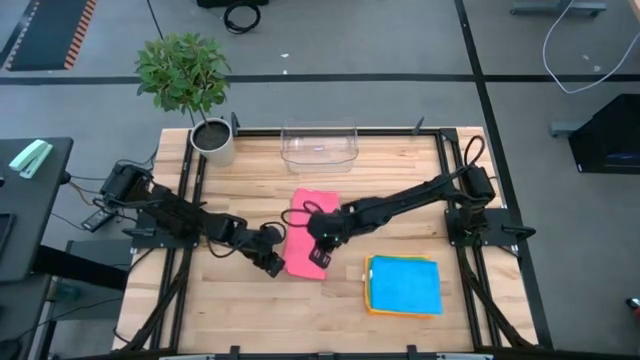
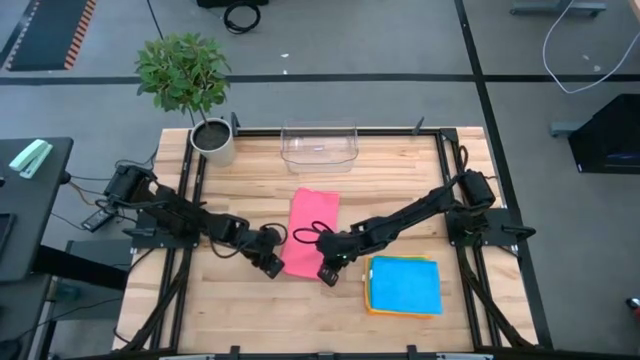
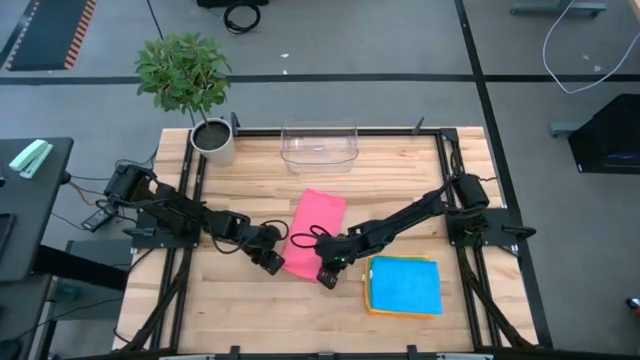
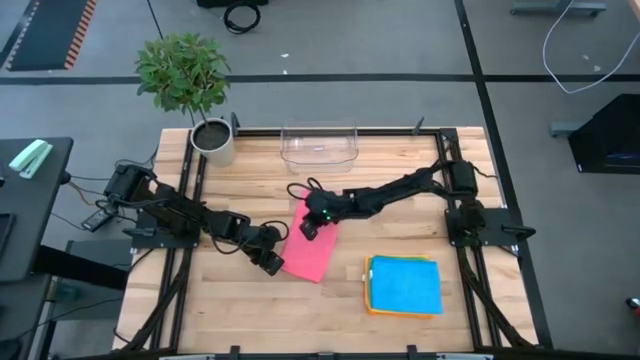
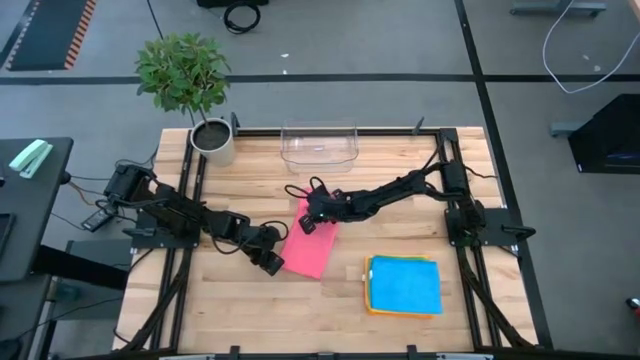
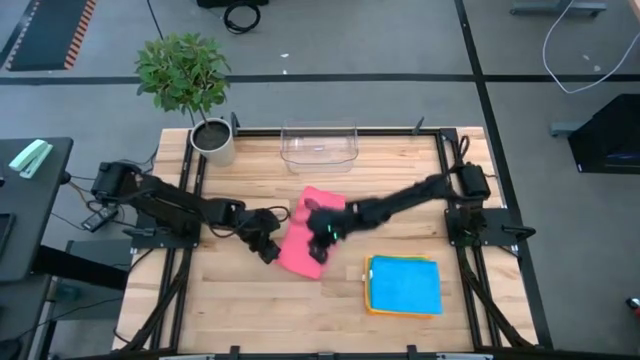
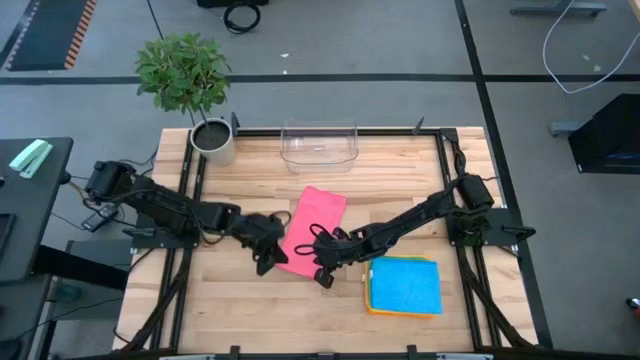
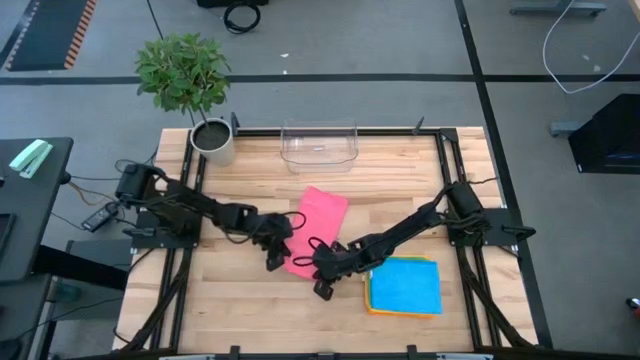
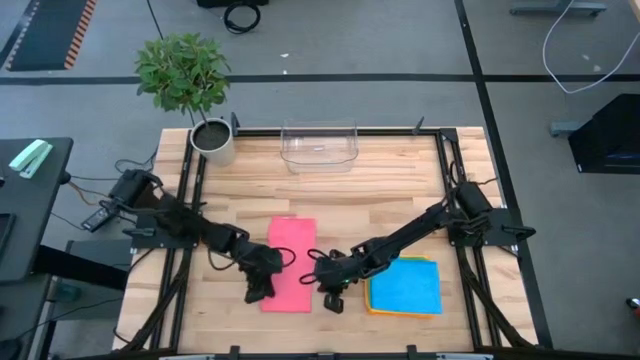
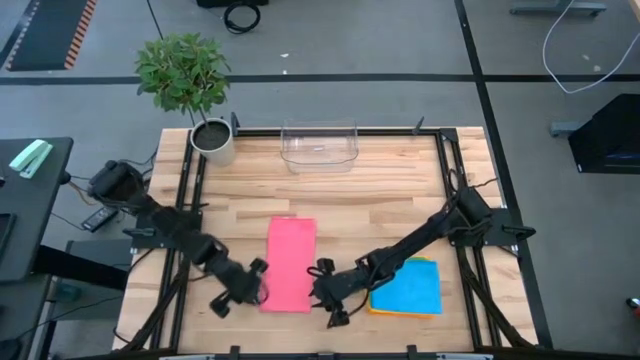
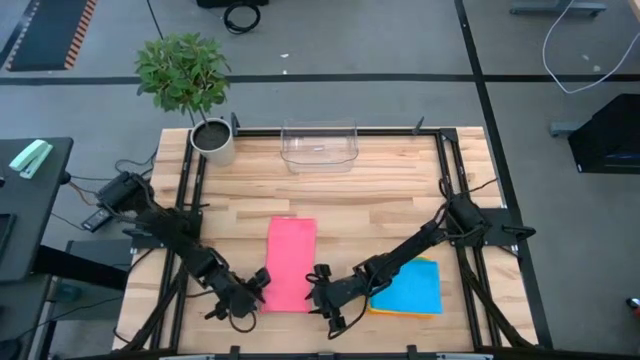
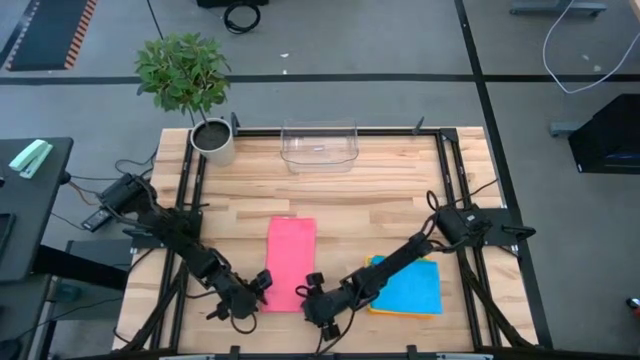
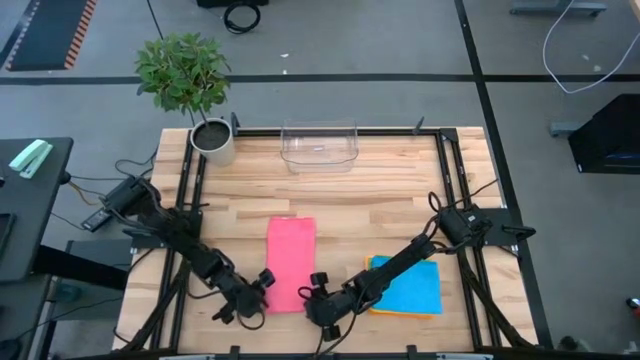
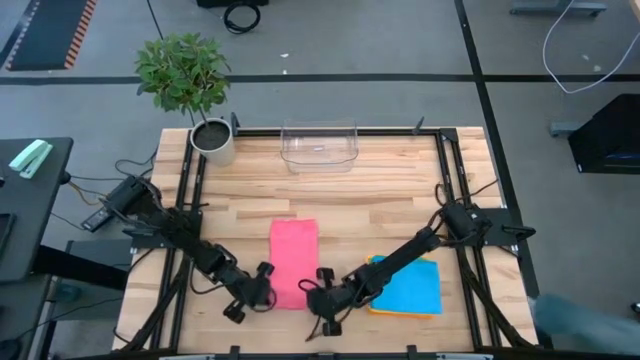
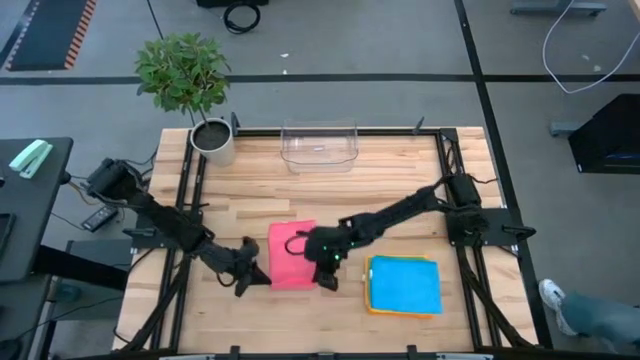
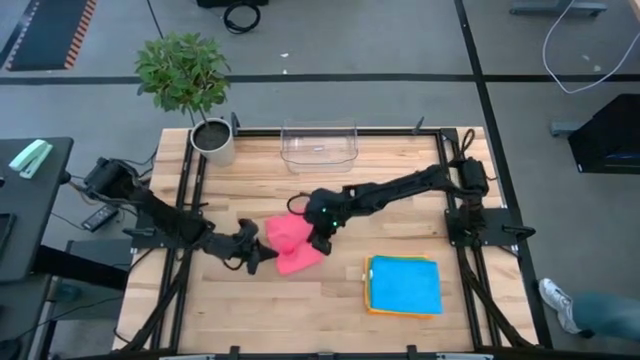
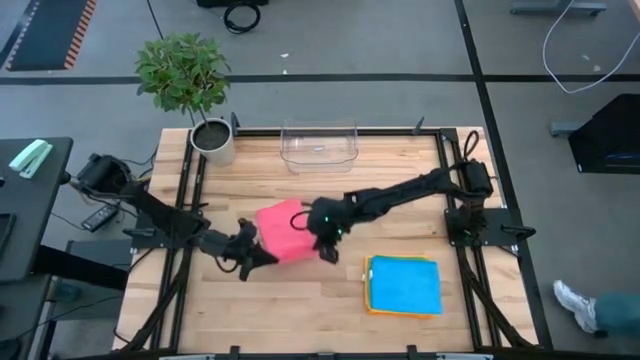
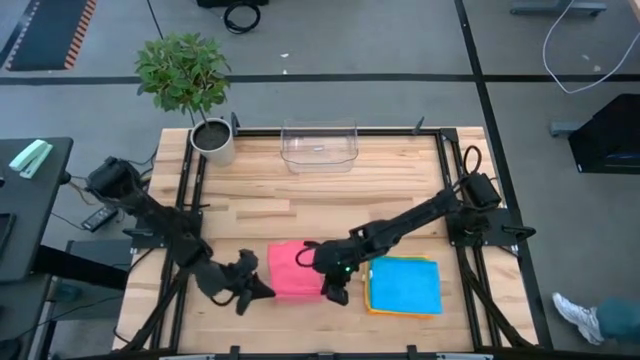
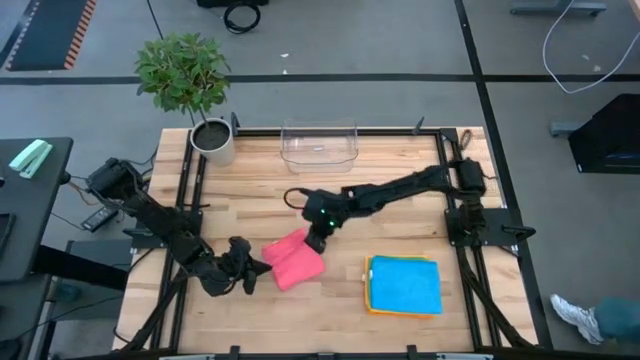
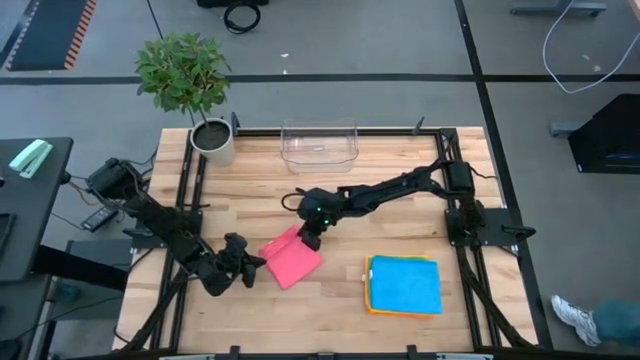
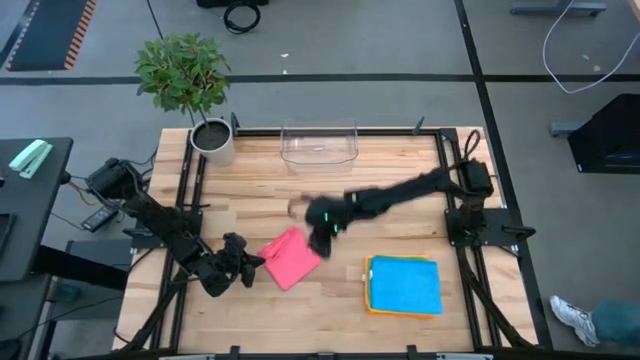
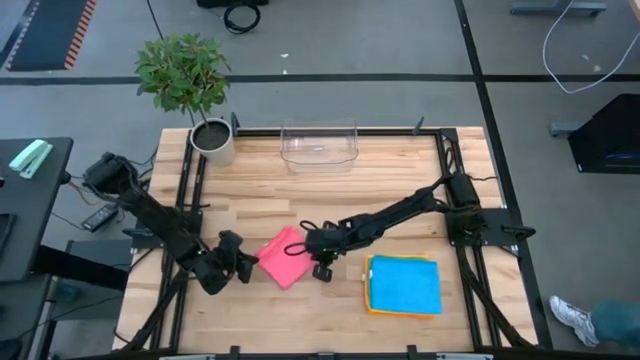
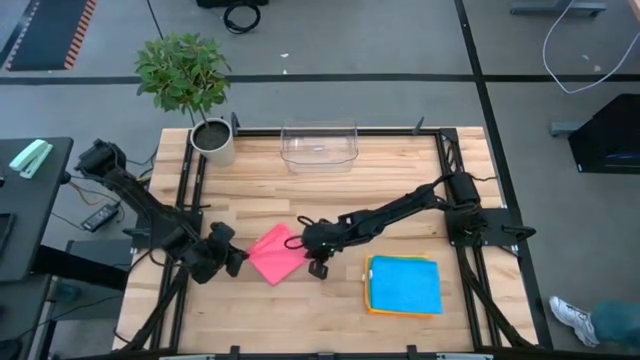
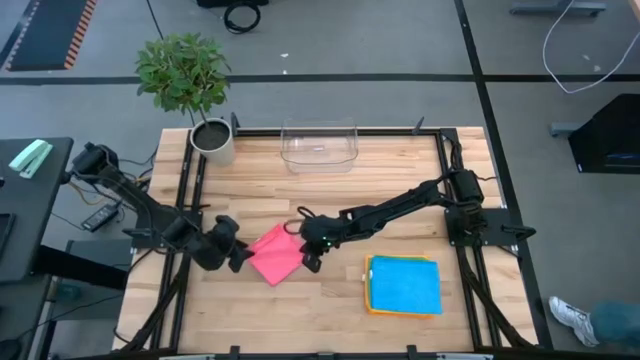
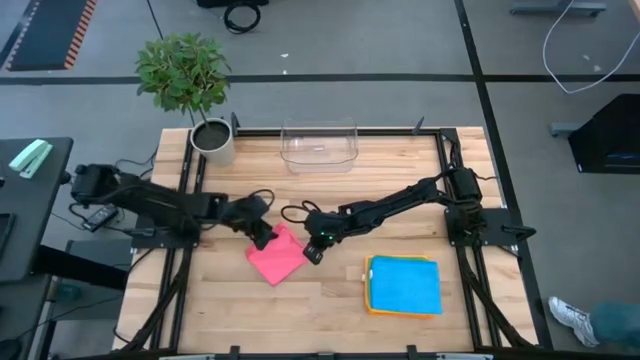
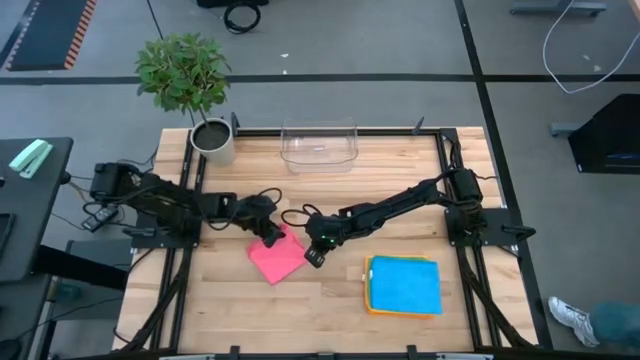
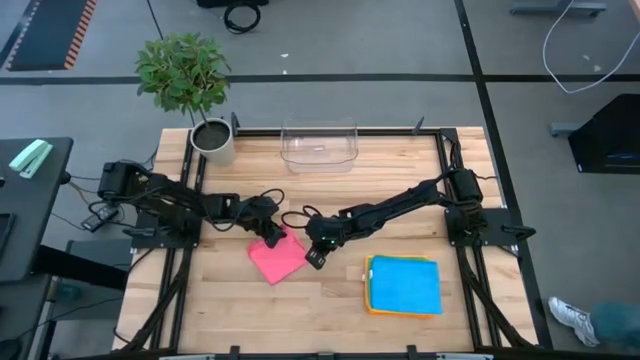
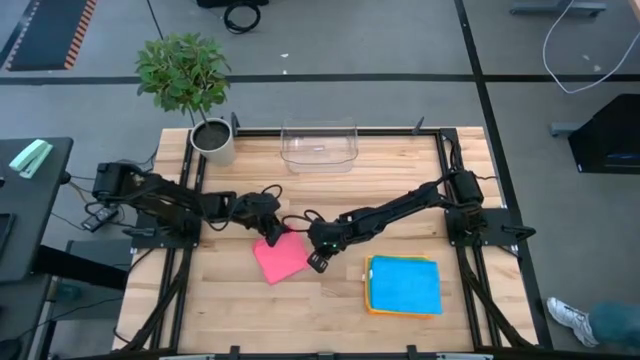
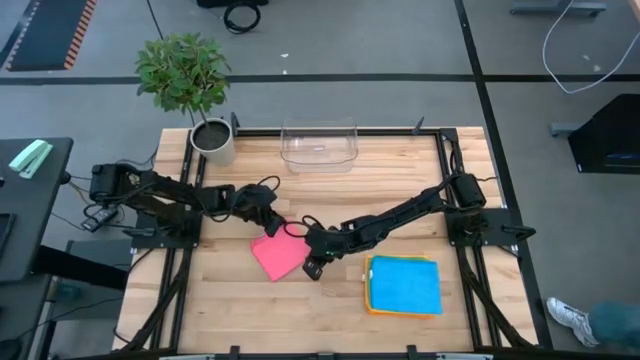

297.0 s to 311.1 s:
Task: Fold microfiber towels
Fold the pink towel on the table

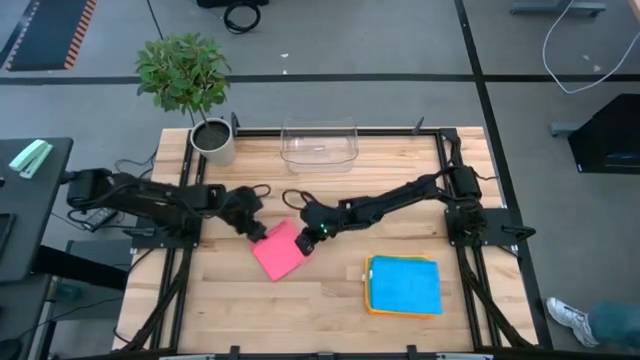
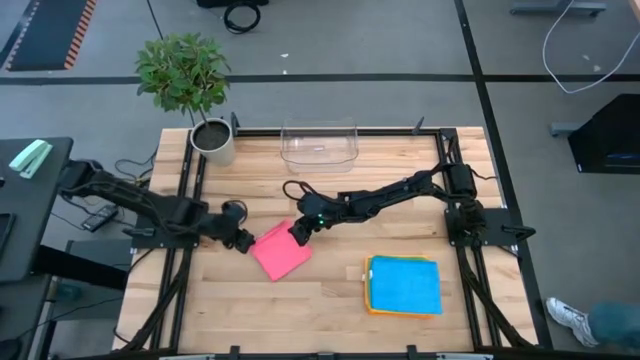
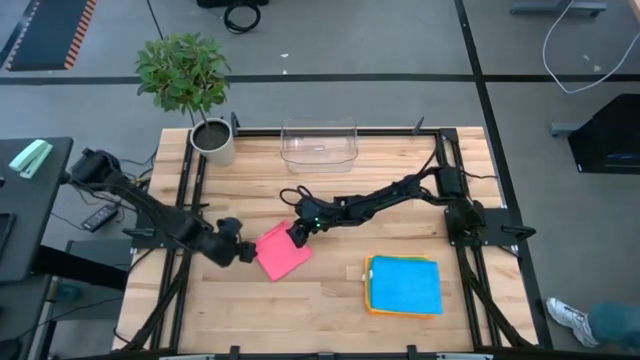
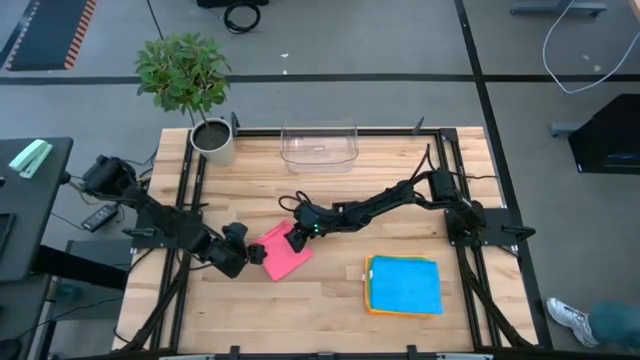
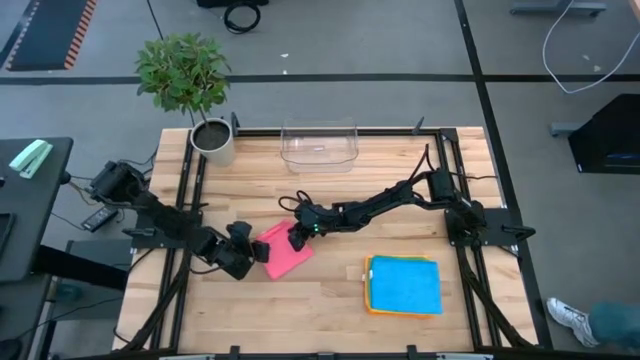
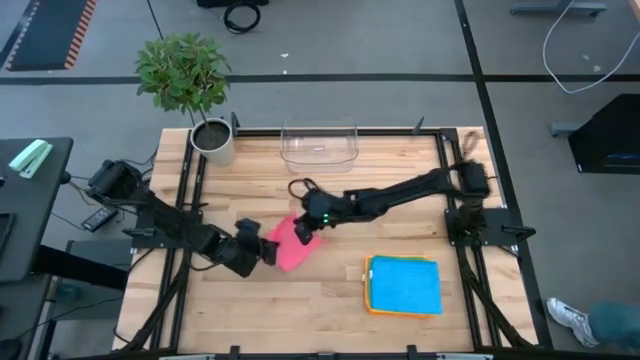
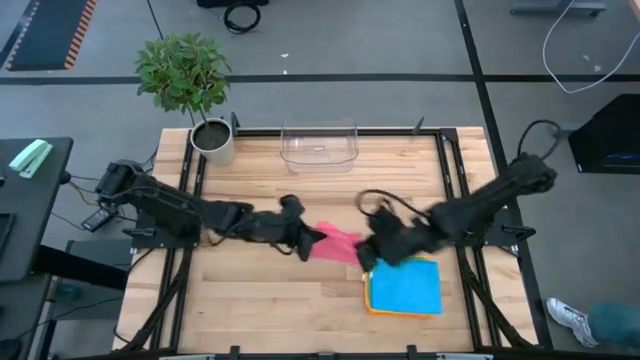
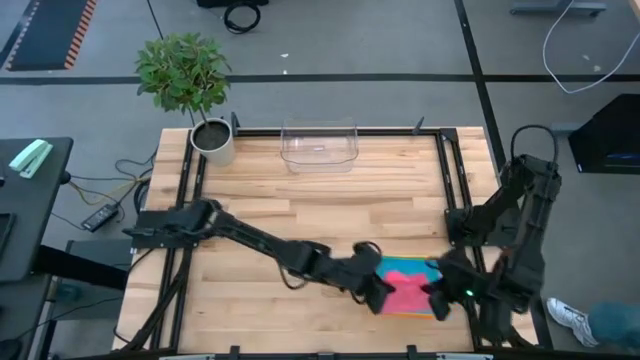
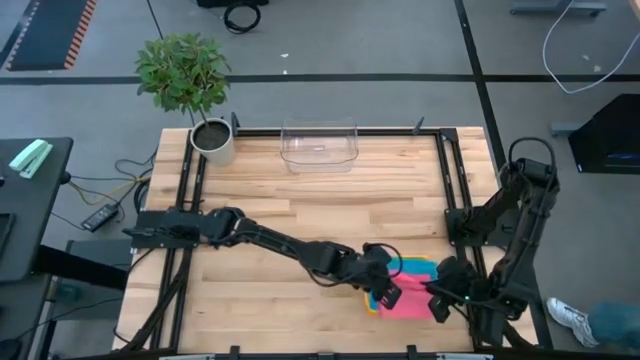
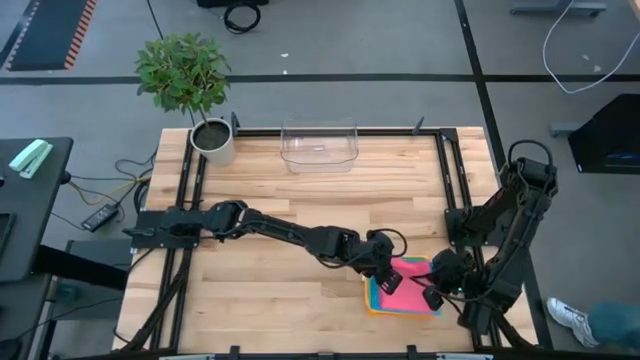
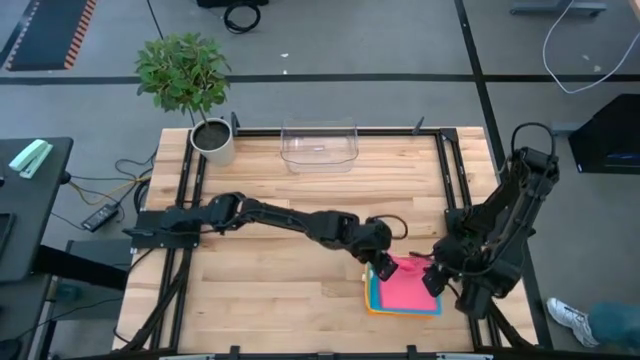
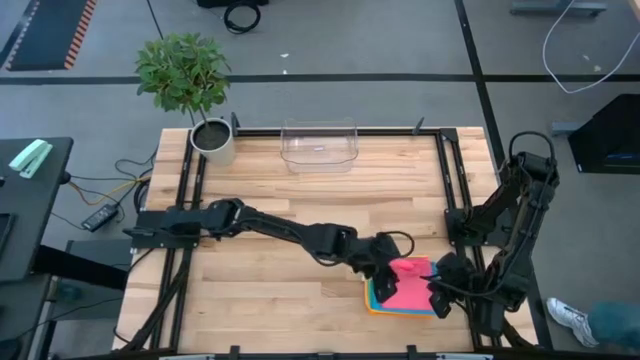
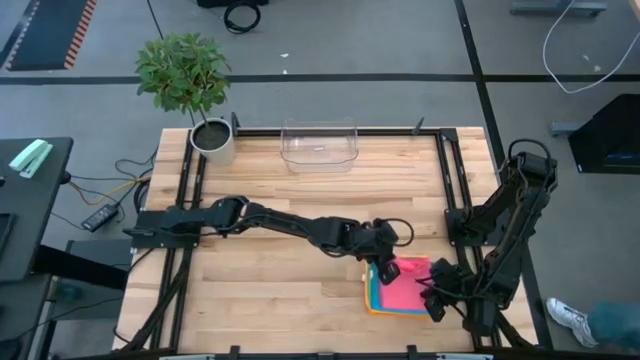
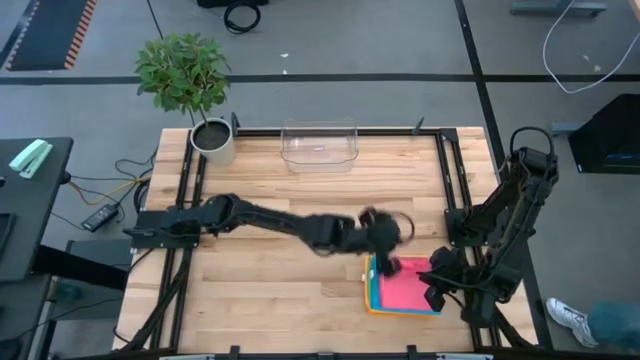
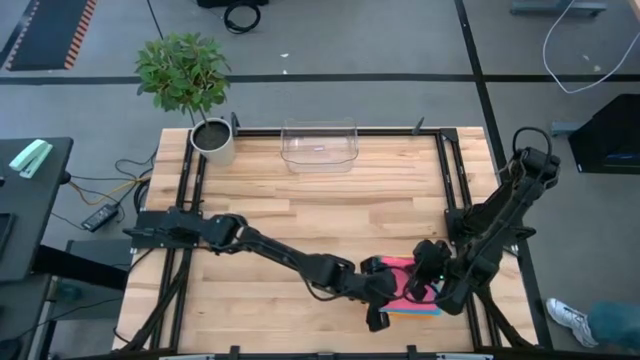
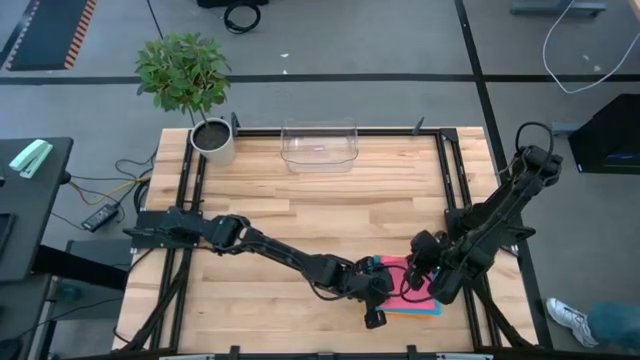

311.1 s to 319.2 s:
Stack the pink towel on the blue towel
